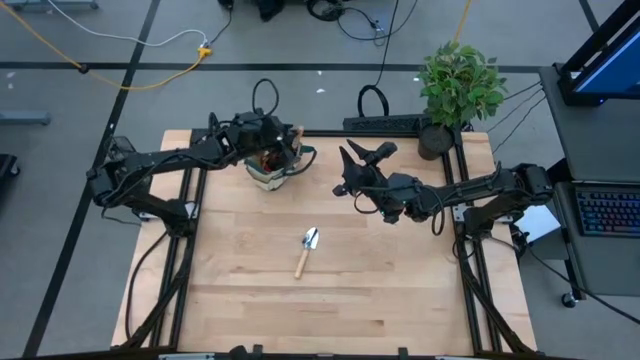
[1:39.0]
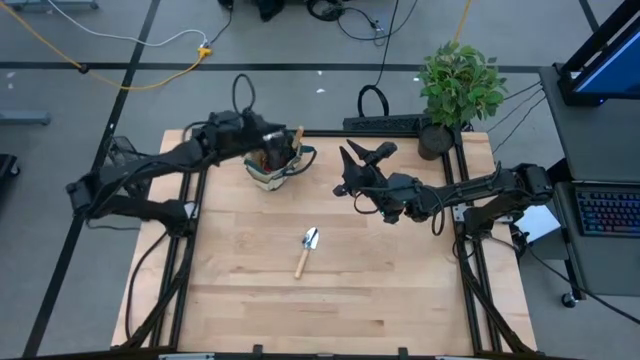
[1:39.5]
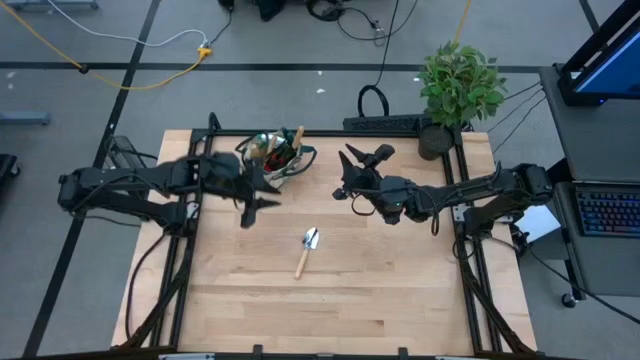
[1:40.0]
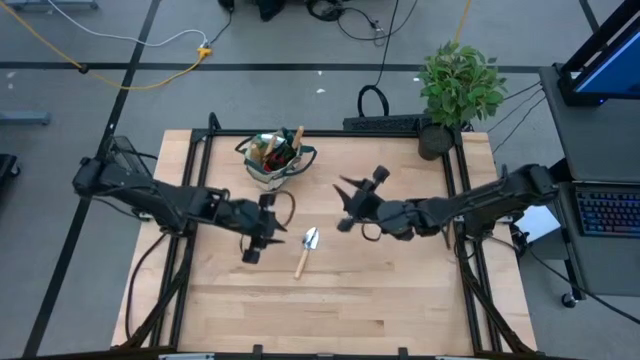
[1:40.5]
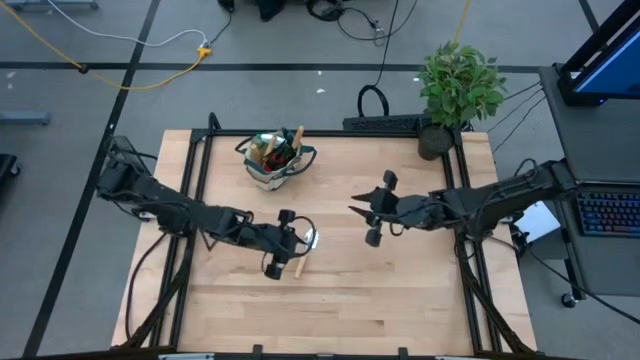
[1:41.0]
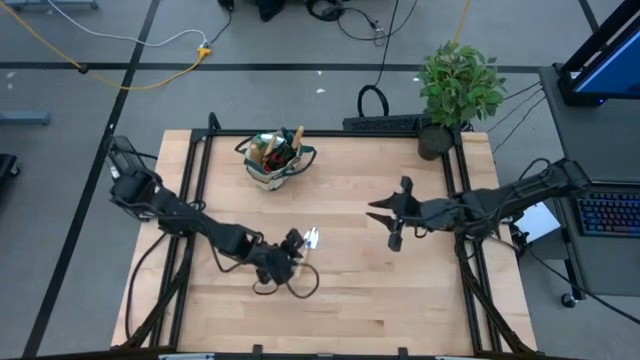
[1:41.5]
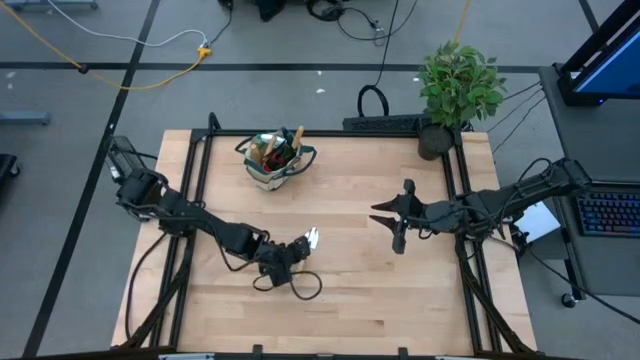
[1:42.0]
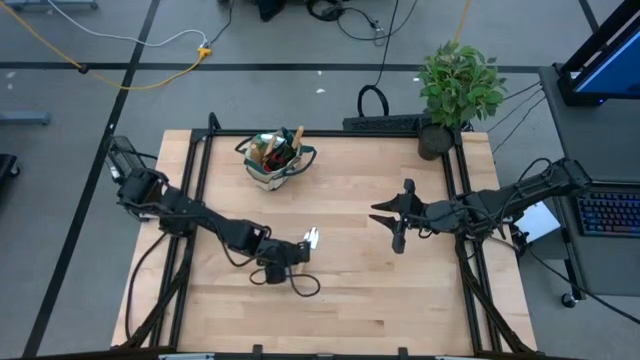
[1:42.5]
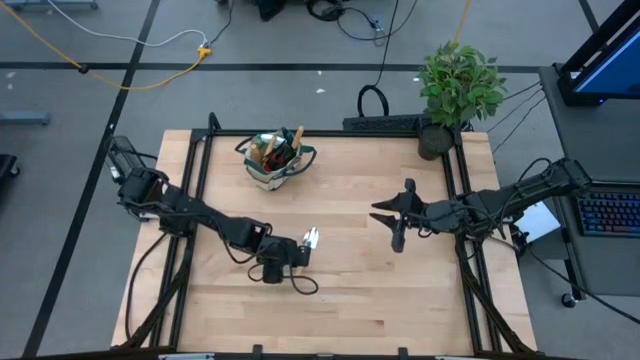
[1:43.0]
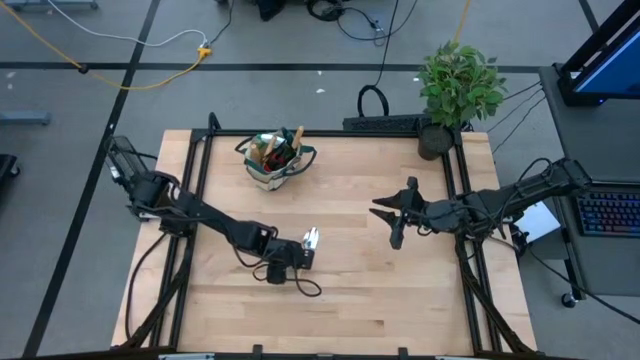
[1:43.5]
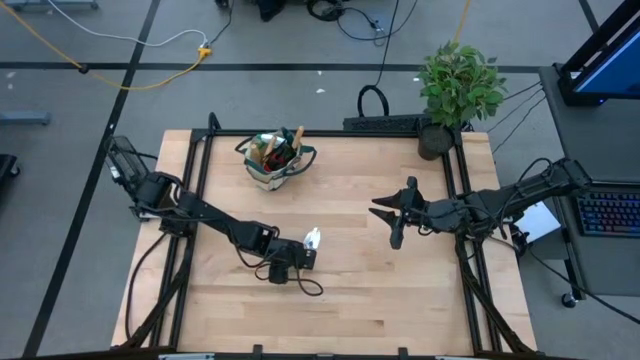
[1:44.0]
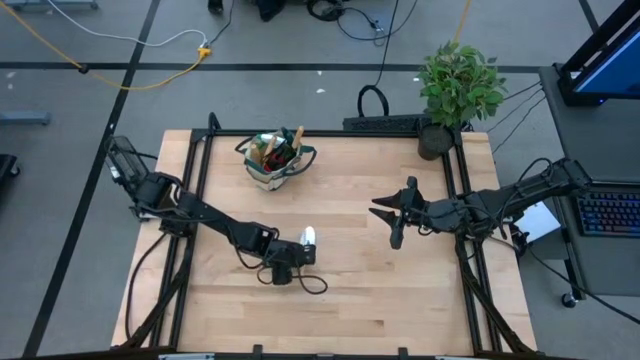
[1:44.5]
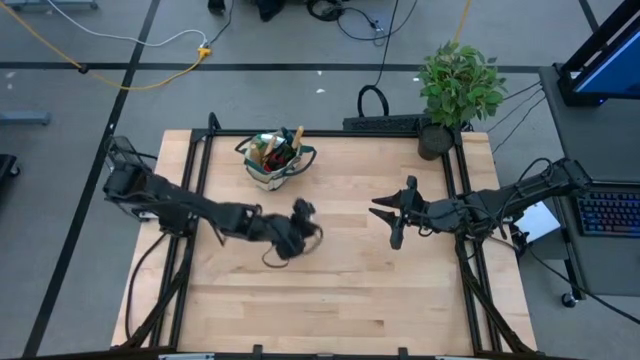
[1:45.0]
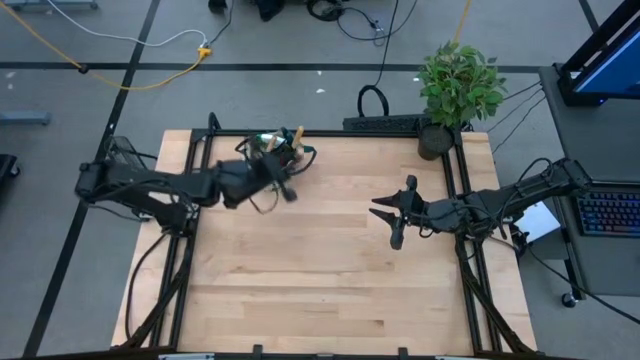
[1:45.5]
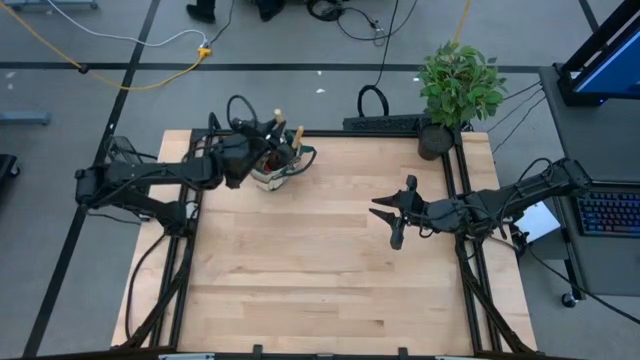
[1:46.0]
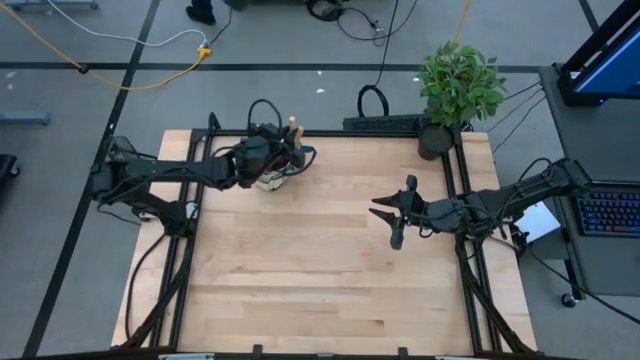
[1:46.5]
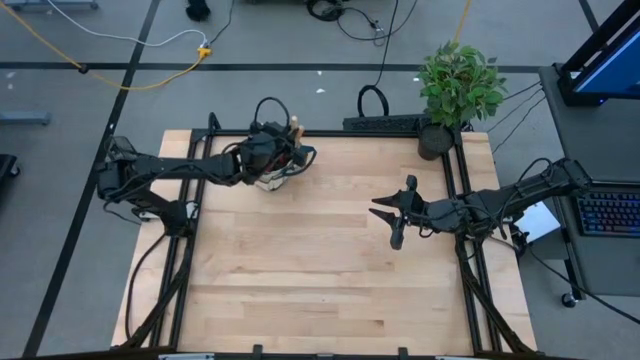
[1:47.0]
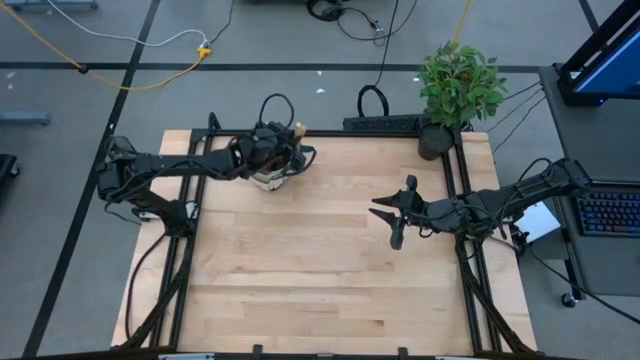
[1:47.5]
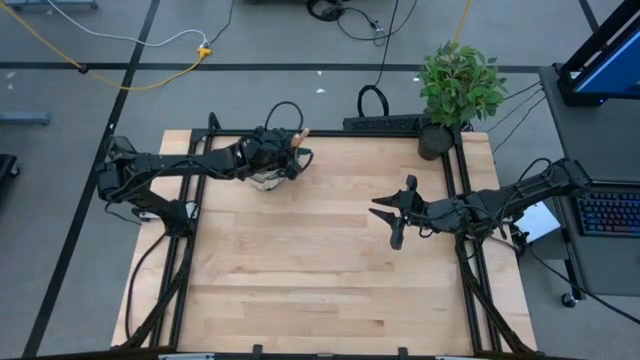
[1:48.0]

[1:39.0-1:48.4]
Task: Pick & Place Garden tools in Gardening bag
Put the trowel into the gardening bag

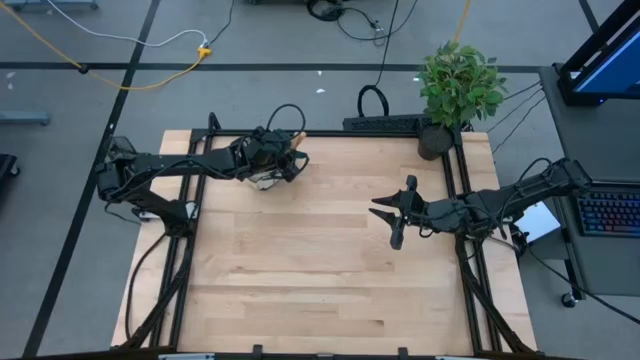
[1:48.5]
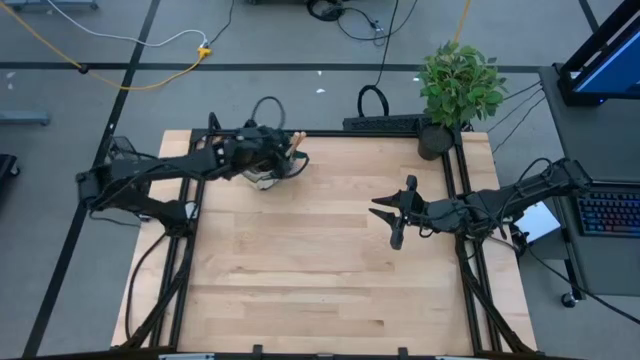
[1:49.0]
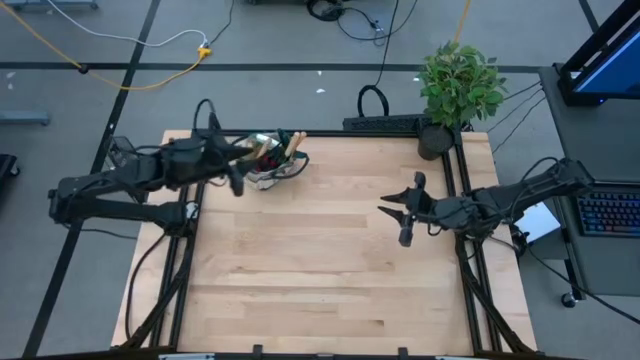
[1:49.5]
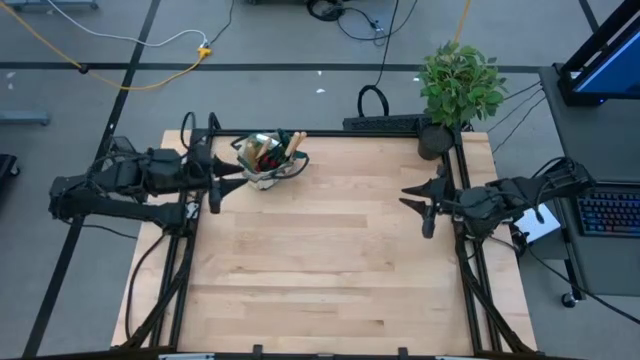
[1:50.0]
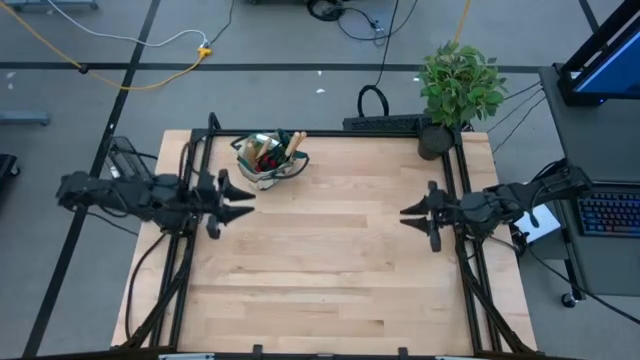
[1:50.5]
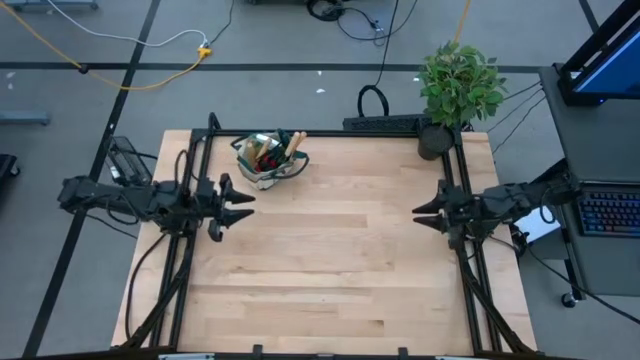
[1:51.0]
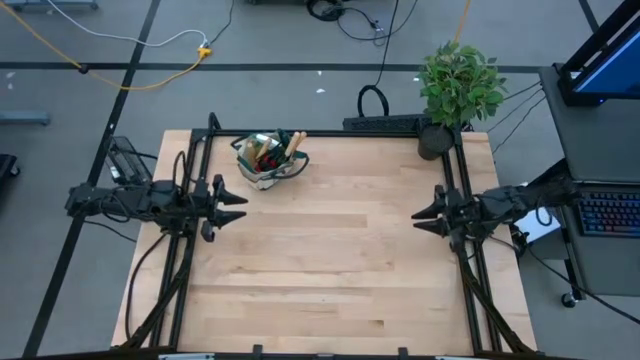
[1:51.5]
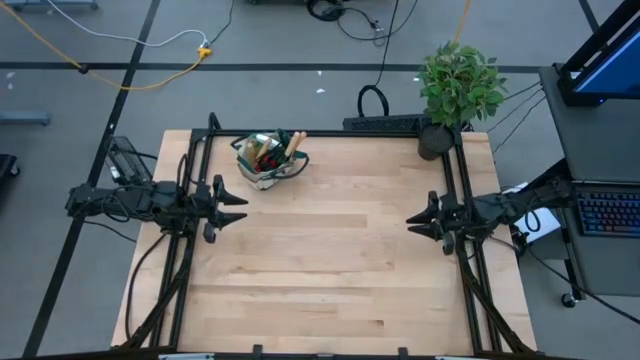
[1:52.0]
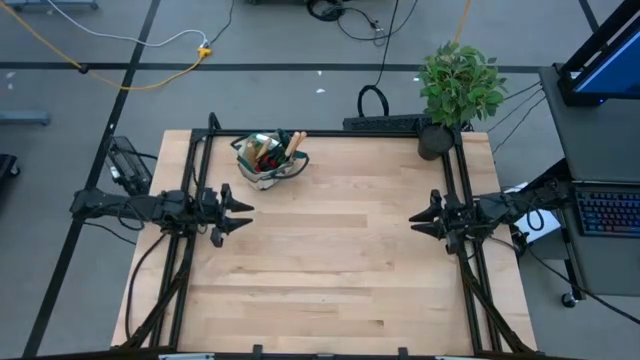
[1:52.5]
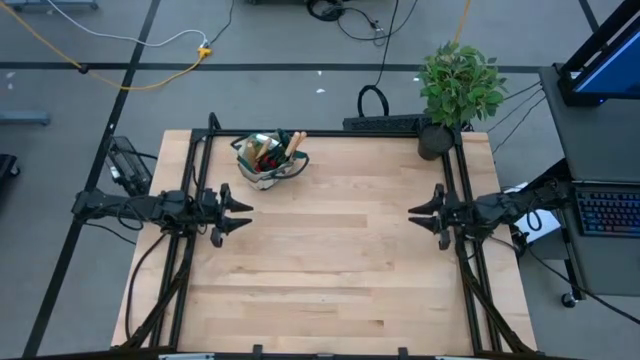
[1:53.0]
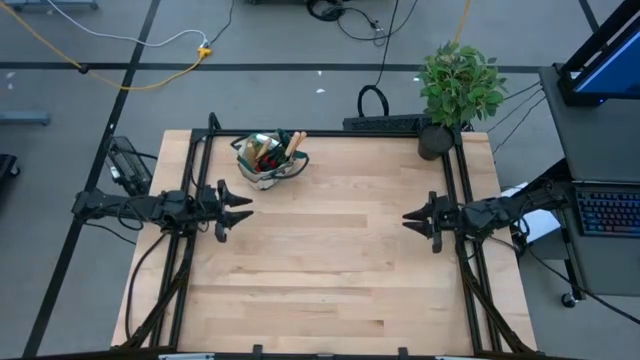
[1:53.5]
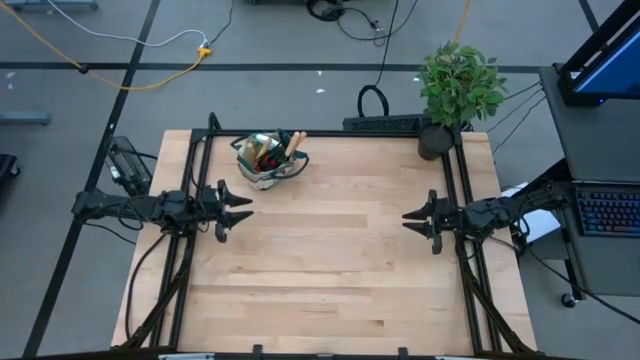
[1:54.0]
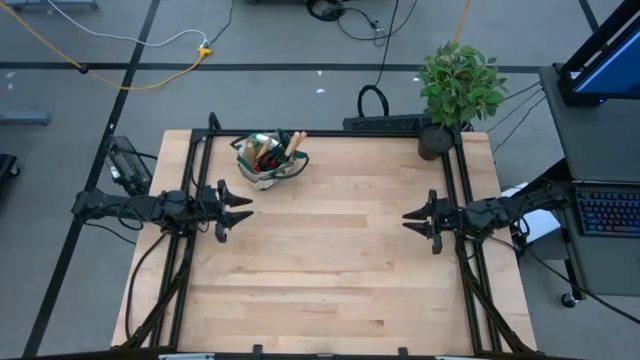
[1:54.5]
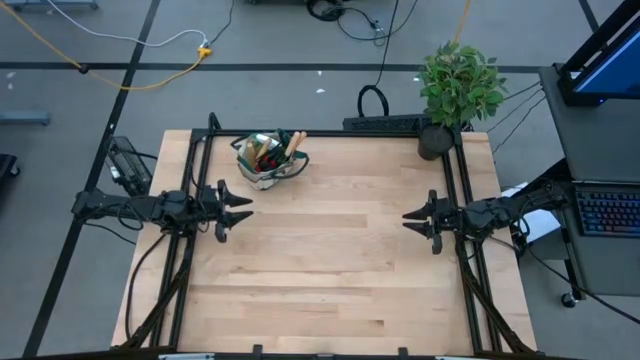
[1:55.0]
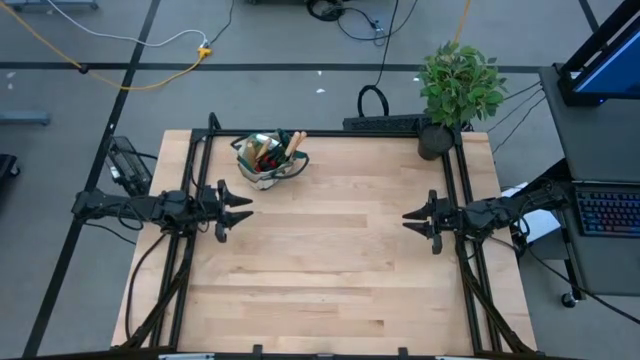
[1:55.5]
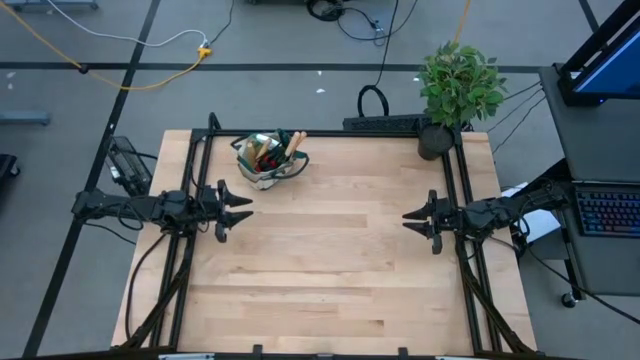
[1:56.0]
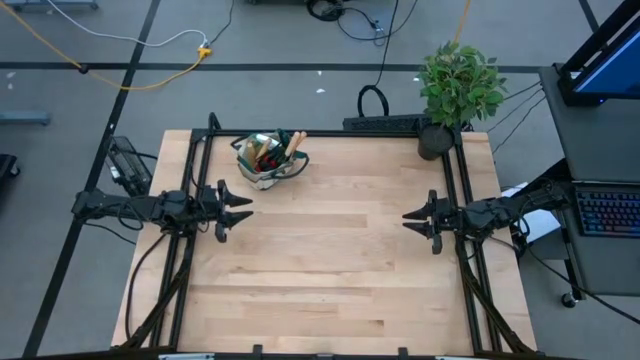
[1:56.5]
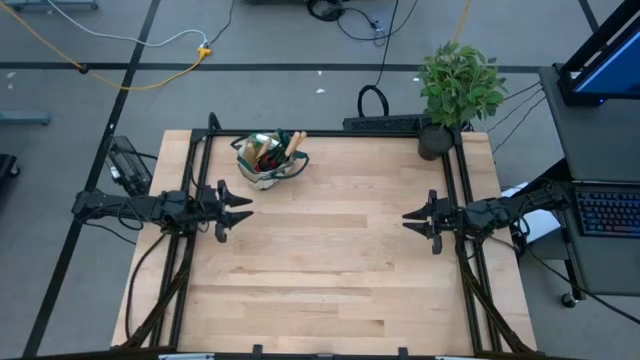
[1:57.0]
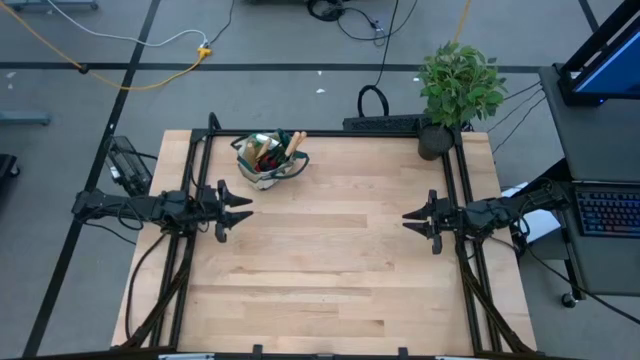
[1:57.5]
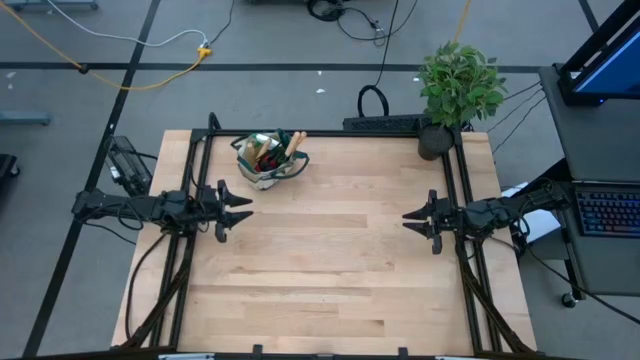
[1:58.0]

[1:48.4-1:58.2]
Return to Home Position

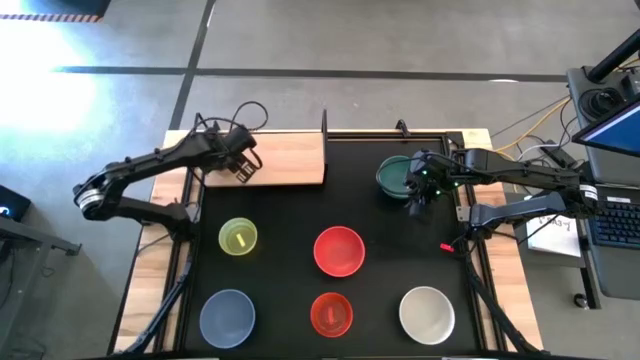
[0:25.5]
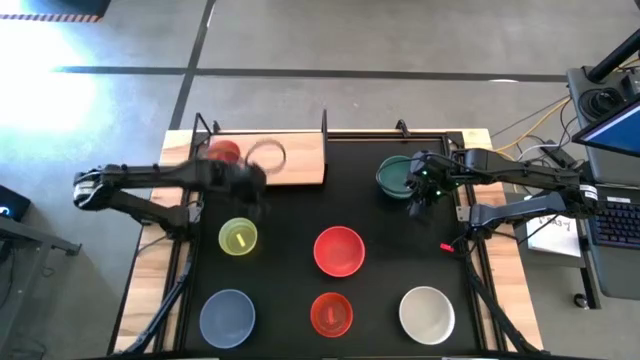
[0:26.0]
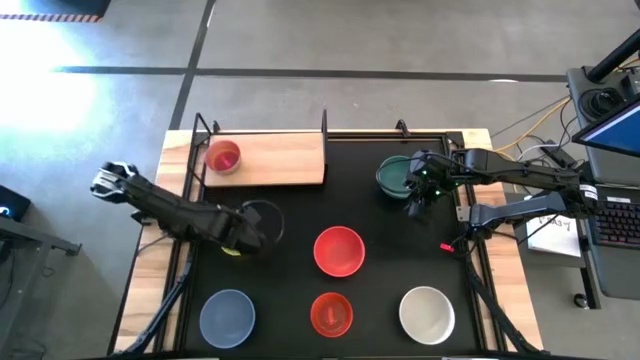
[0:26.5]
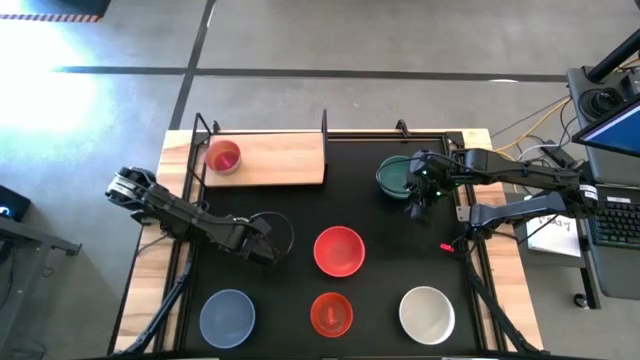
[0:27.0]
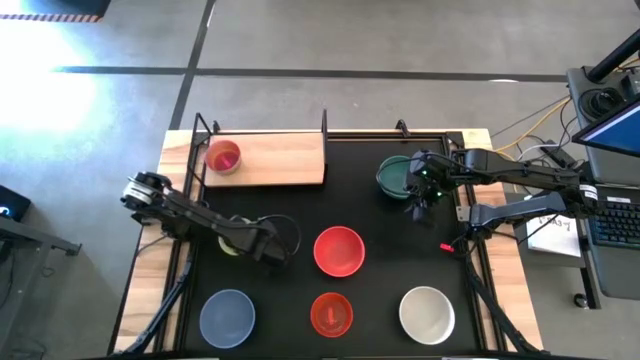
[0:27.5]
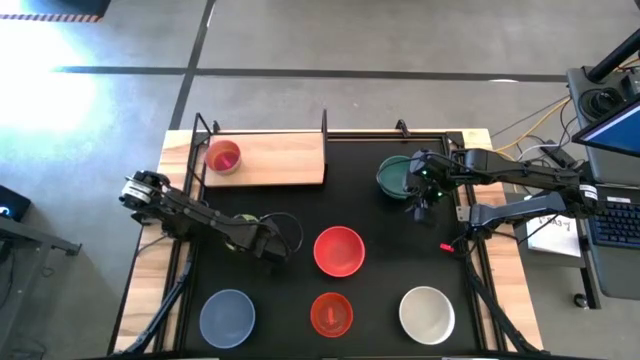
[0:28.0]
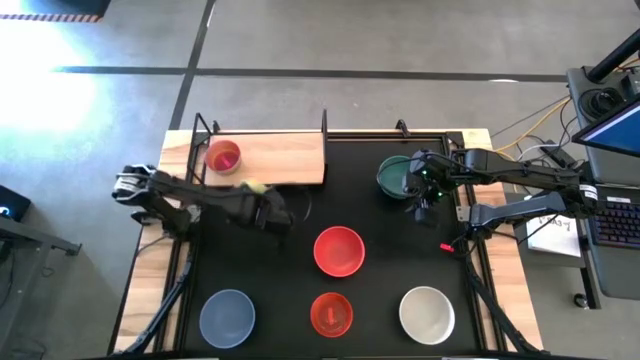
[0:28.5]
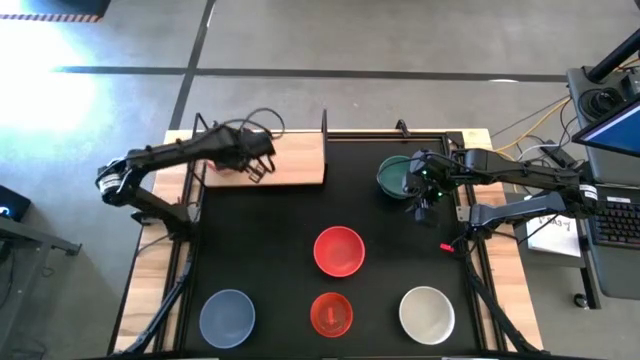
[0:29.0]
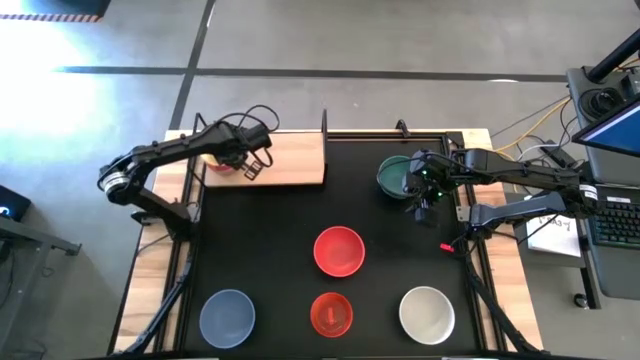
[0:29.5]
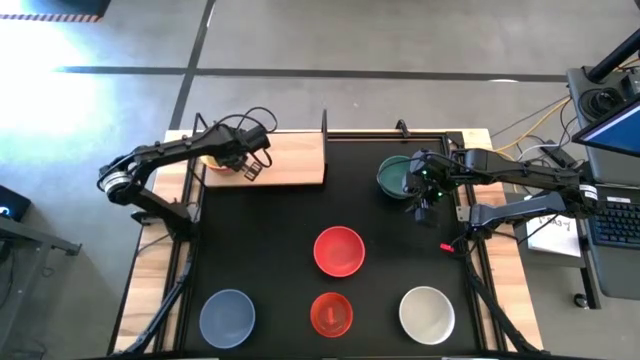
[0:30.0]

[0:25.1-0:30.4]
Task: Place and stack bowls onto a shelf
Stack the small yellow bowl onto the pink bowl on the shelf
